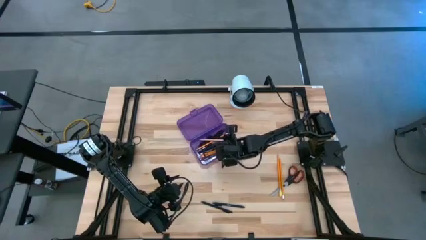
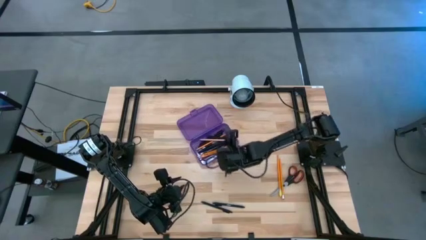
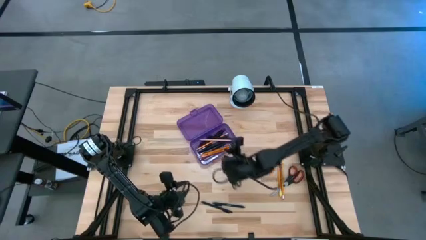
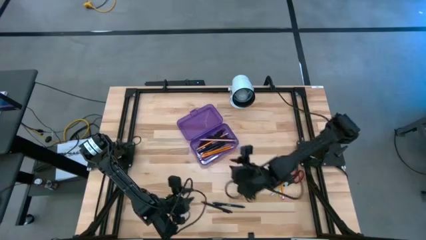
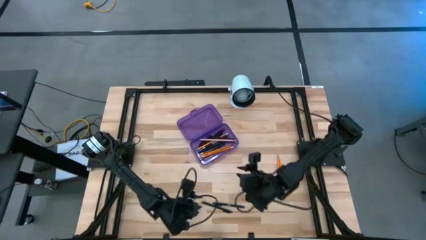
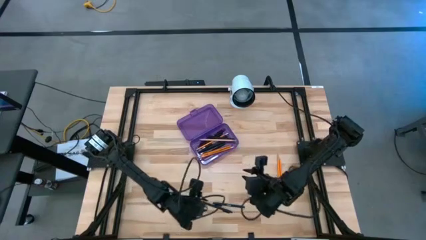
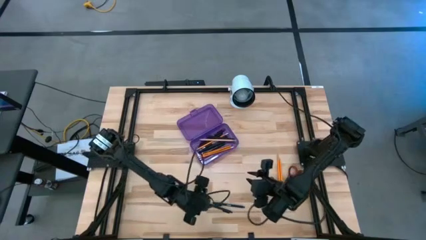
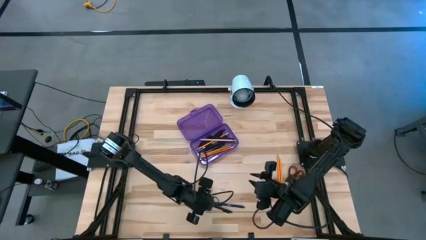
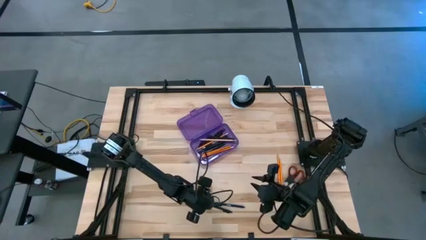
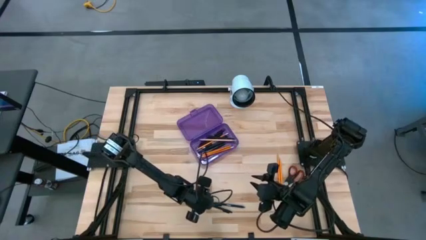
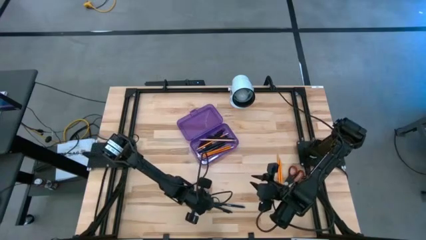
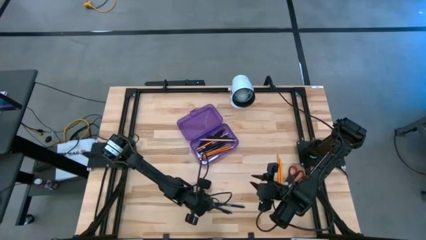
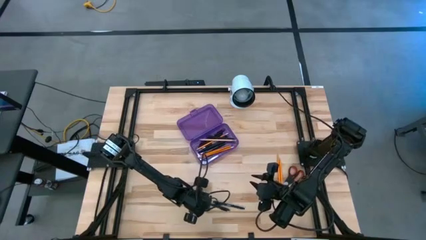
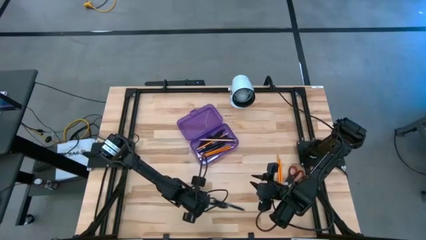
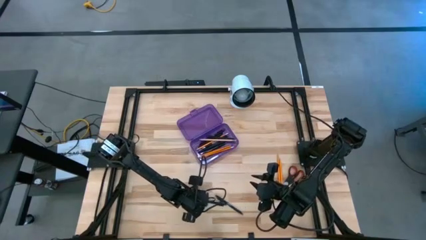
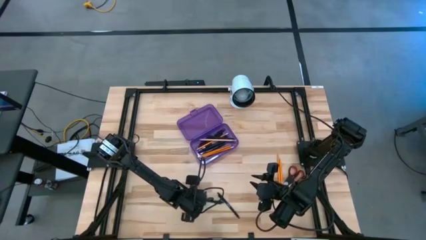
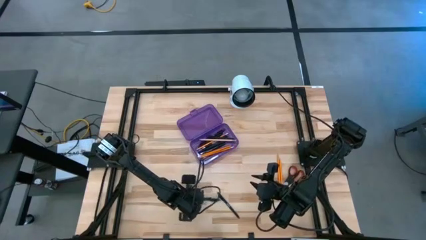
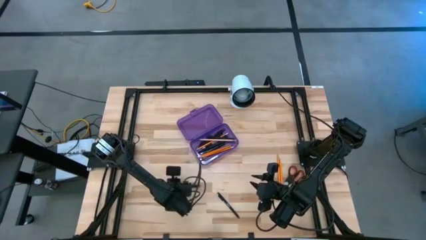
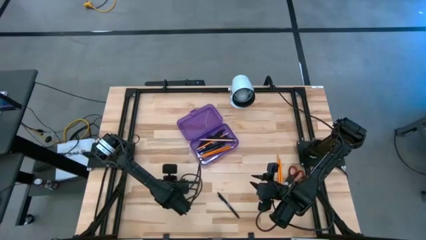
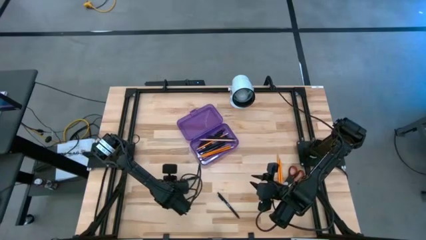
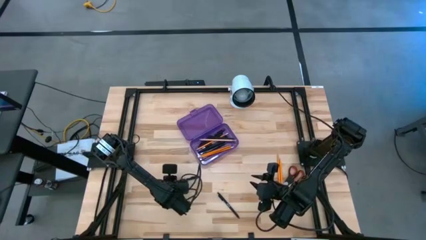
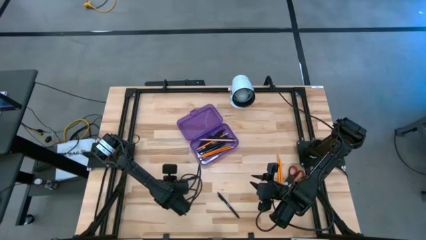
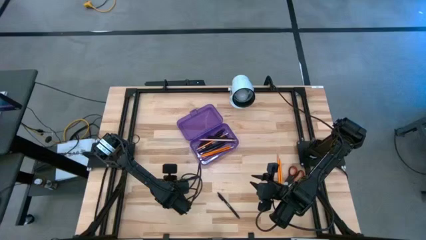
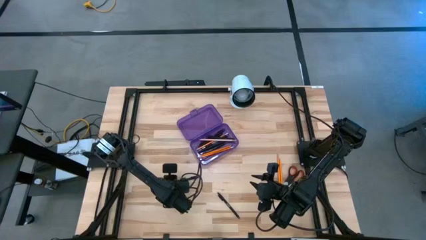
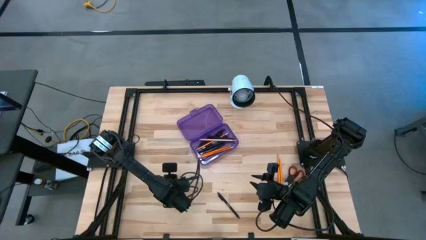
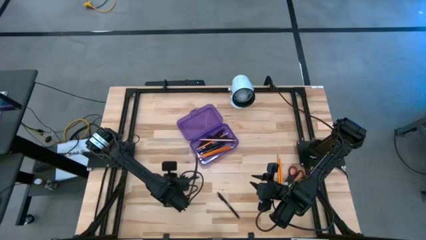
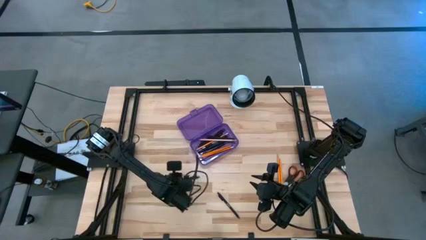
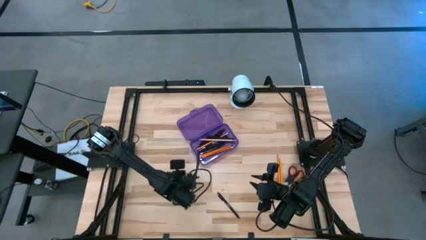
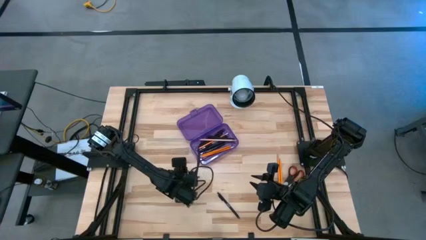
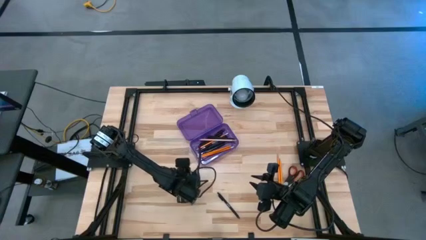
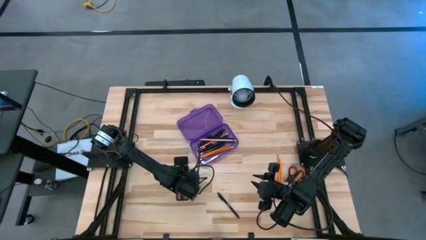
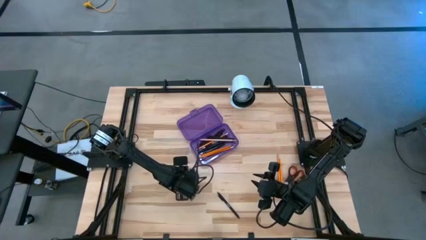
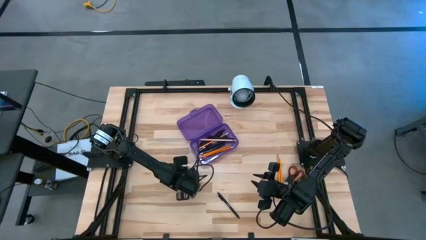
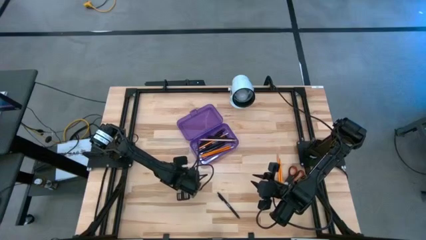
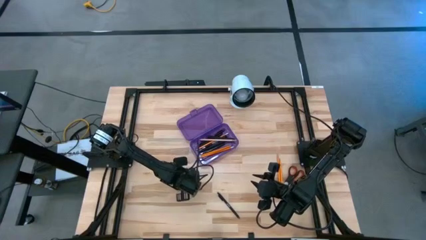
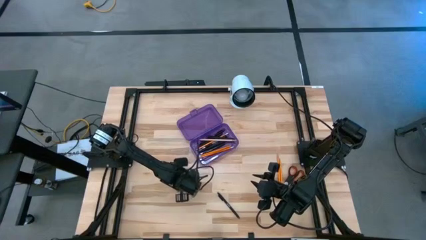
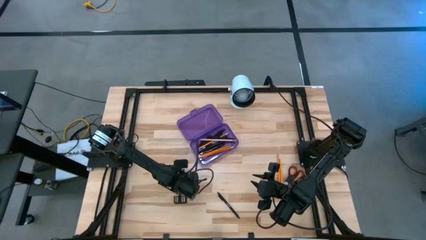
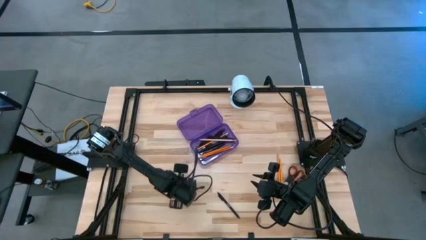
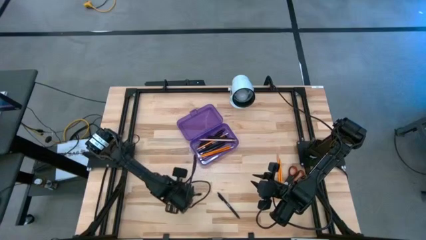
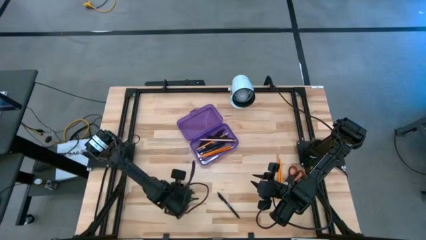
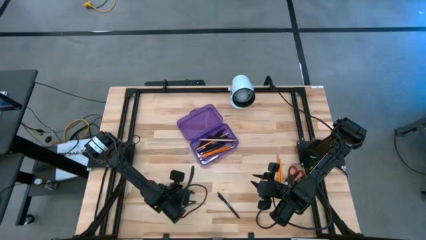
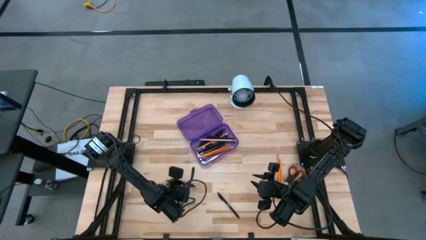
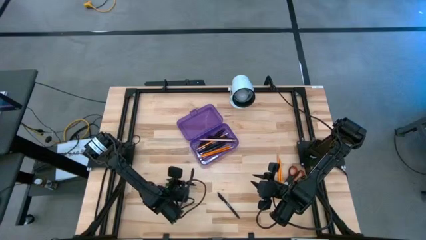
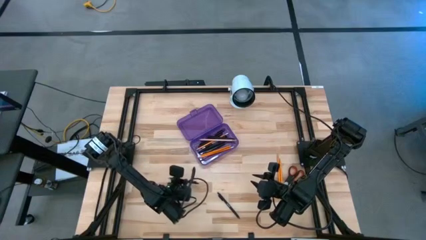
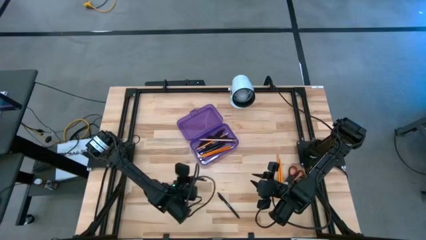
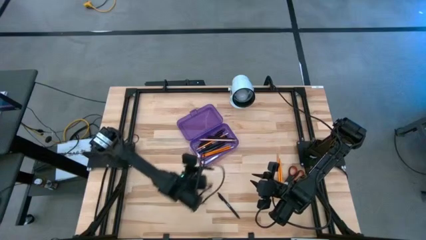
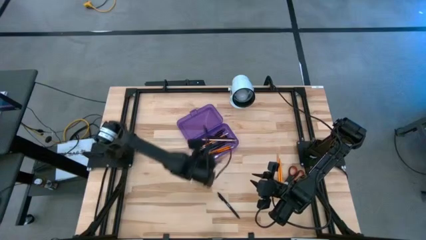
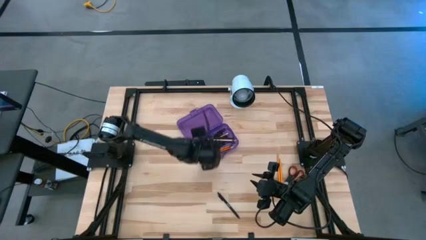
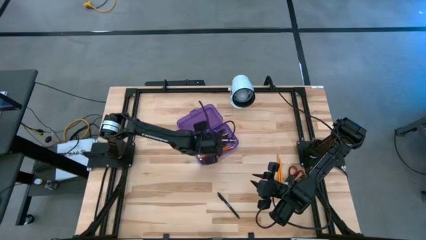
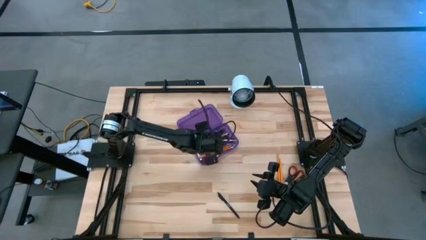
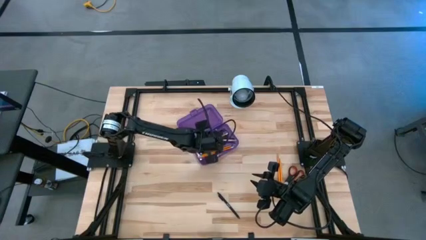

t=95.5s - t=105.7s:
Task: Pick & place school supplies into a supply box
Put the black pen into the purple supply box

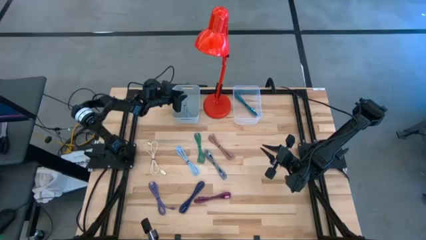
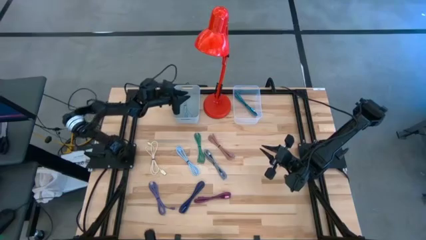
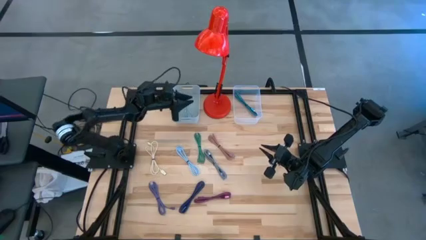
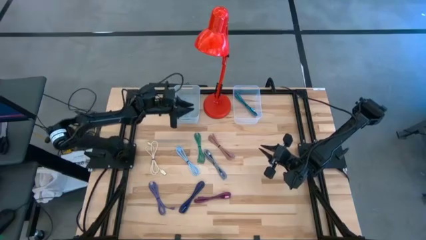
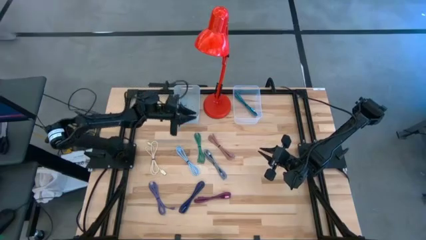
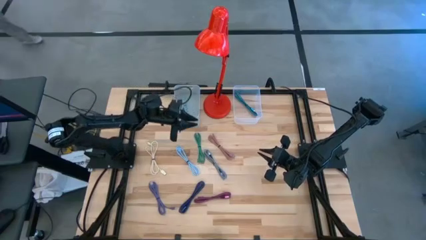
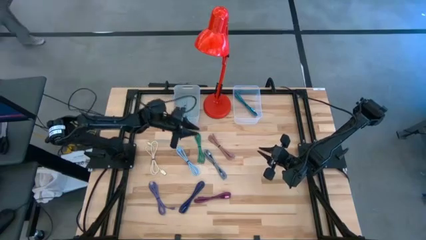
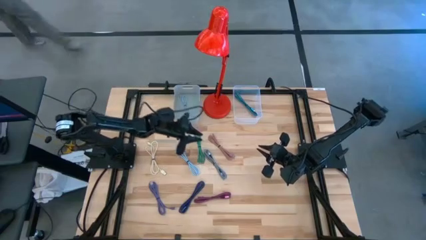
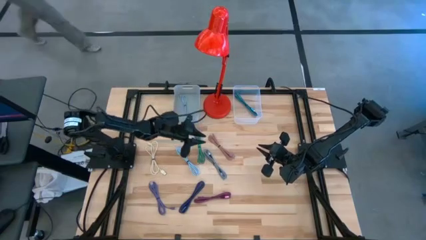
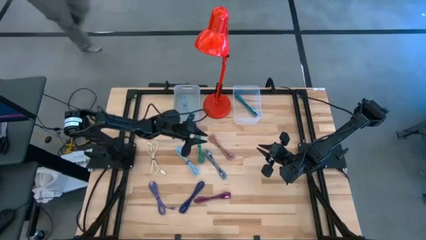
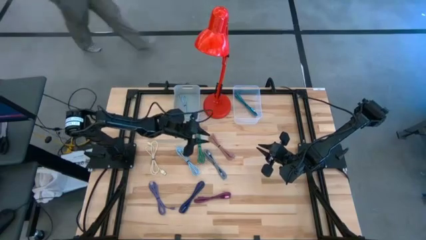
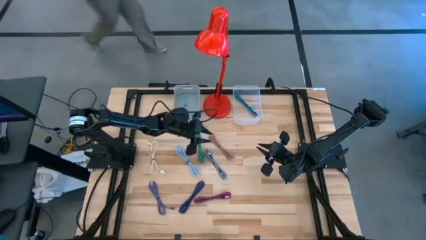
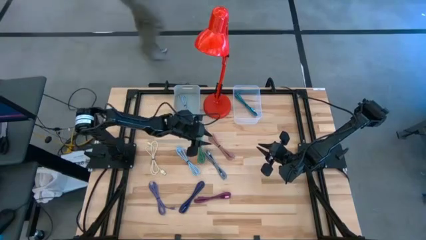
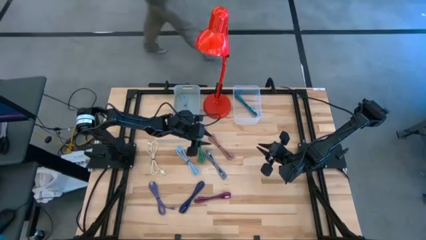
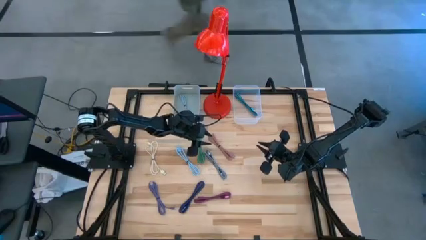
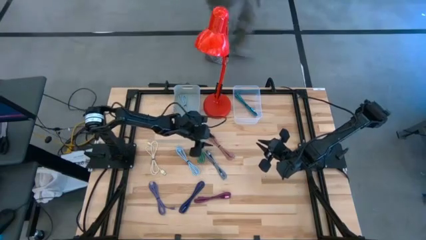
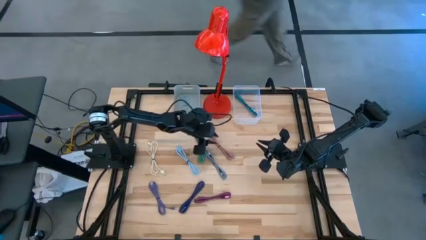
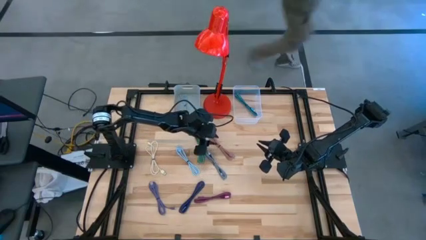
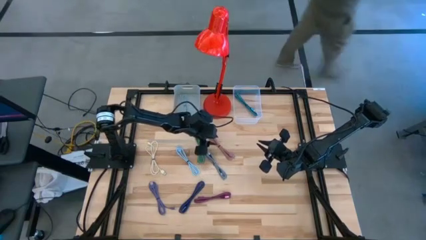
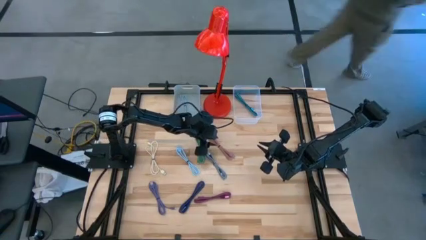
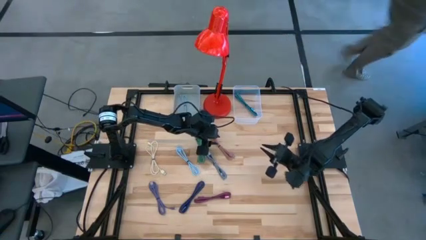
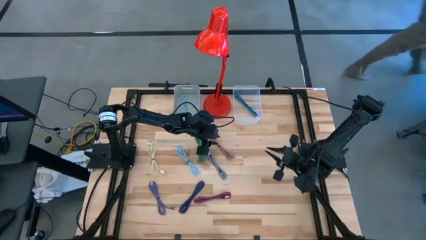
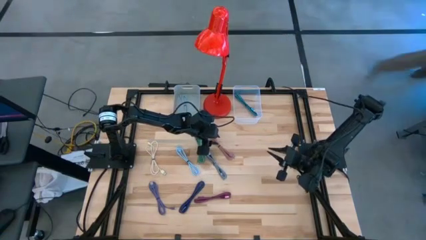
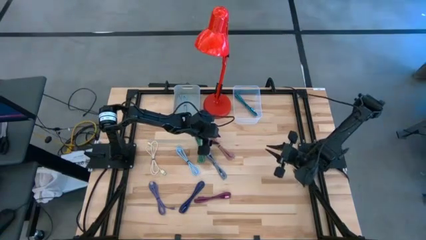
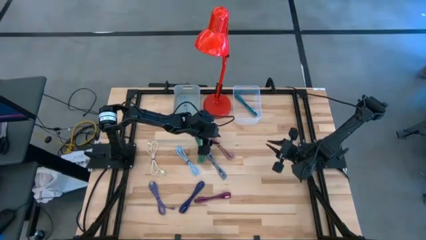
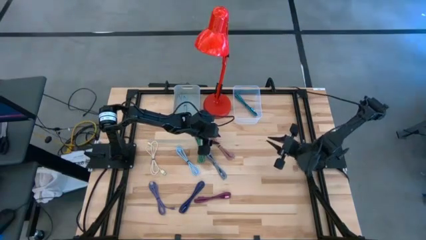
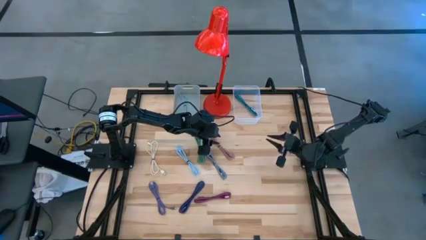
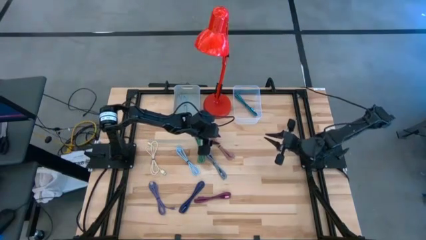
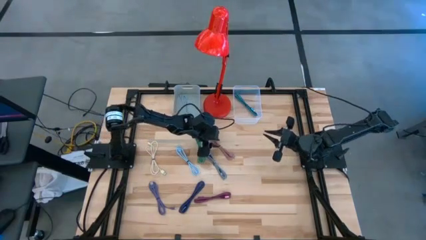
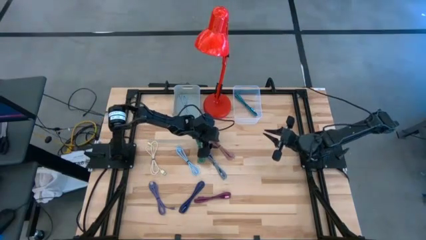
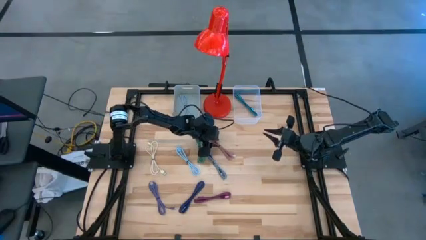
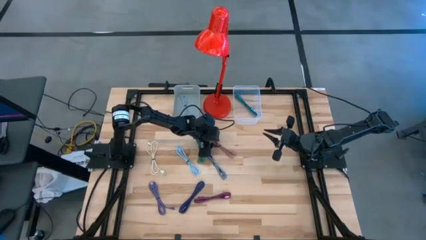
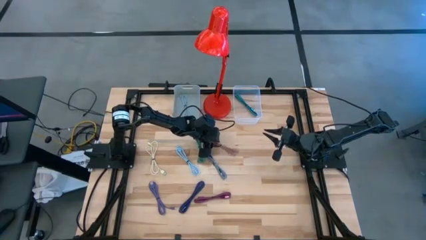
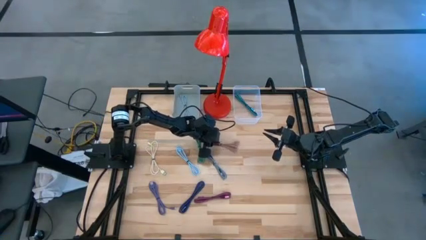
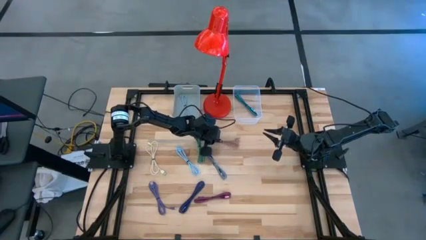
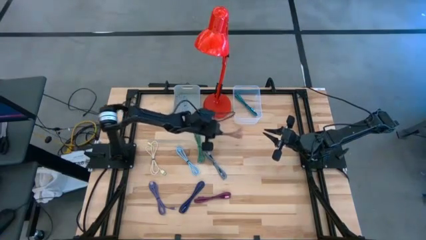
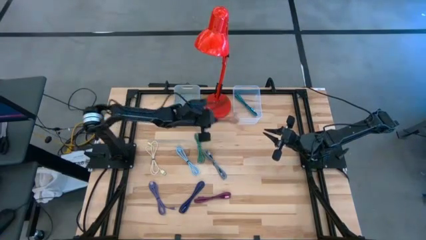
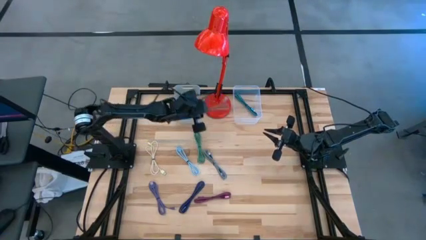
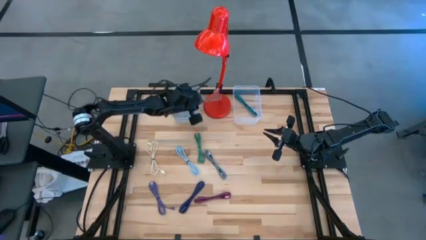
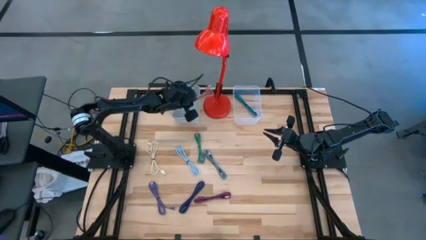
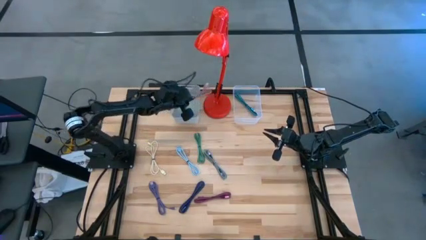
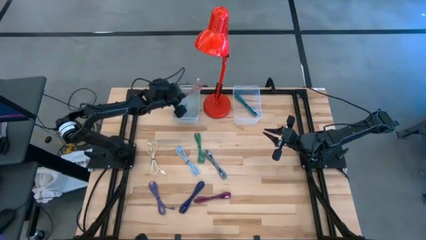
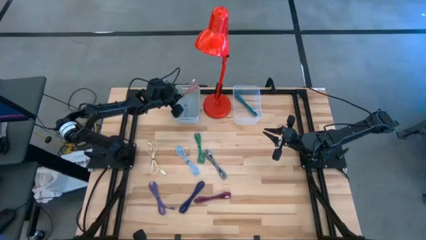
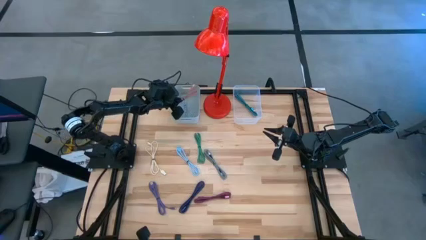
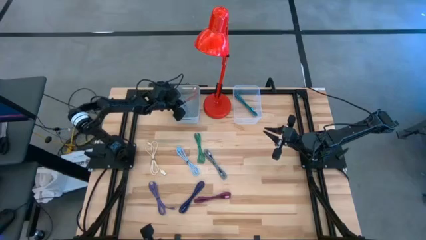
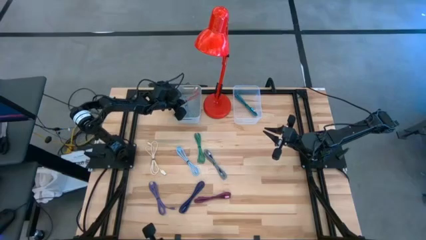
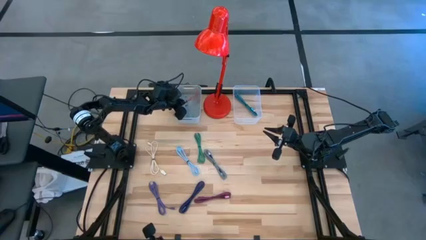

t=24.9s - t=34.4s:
Task: Pick & Place USB Port
Put the light brown charger cable into the gray bin
